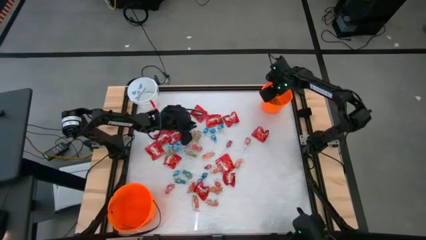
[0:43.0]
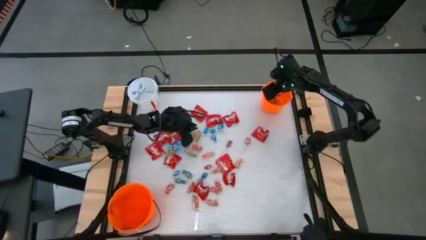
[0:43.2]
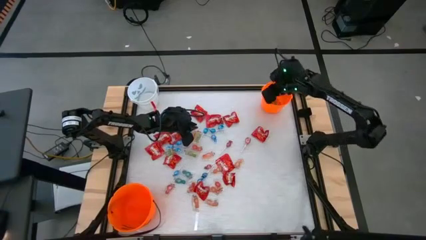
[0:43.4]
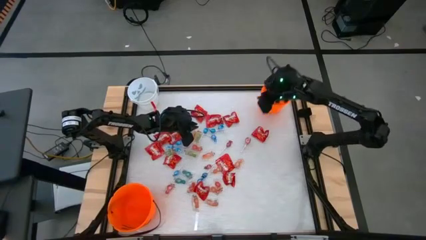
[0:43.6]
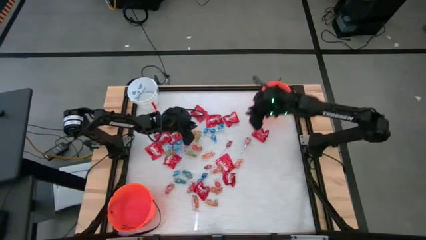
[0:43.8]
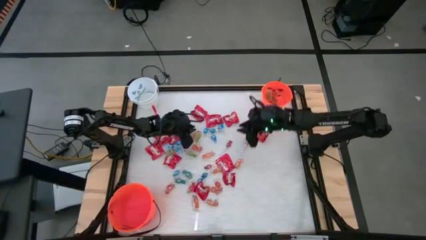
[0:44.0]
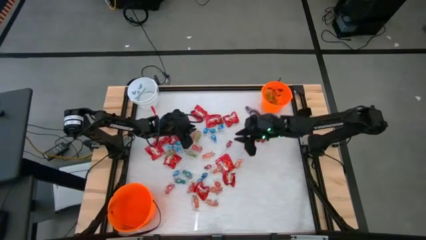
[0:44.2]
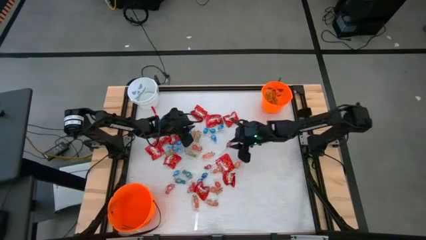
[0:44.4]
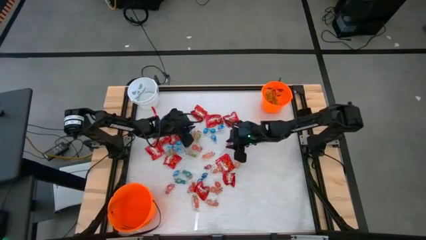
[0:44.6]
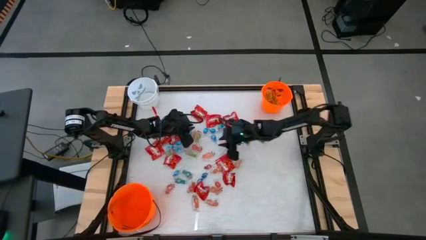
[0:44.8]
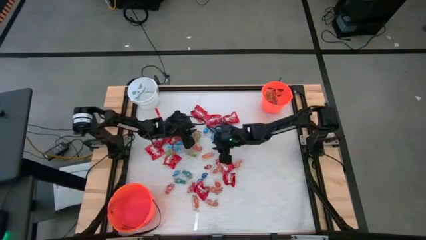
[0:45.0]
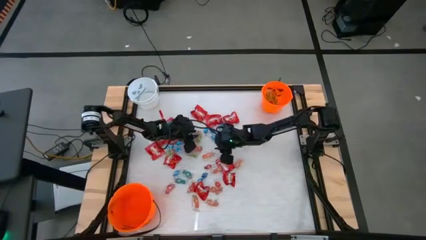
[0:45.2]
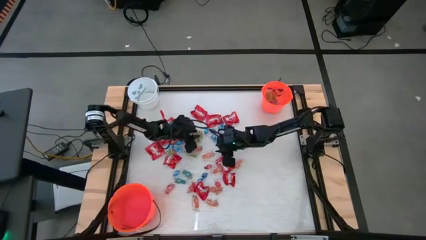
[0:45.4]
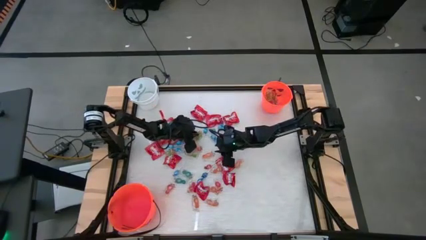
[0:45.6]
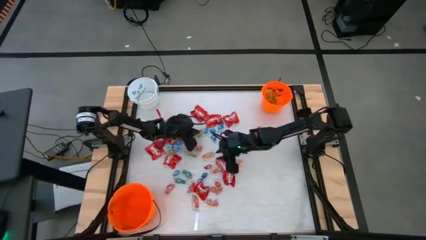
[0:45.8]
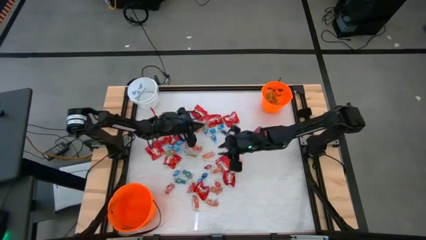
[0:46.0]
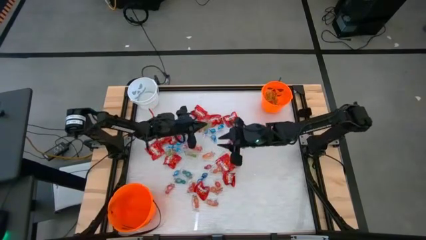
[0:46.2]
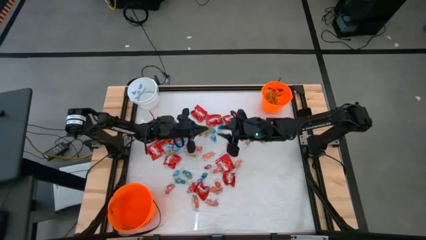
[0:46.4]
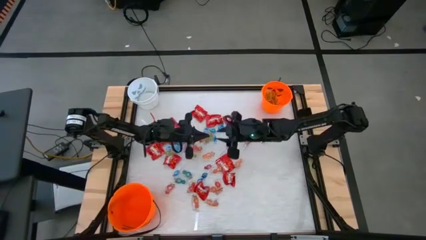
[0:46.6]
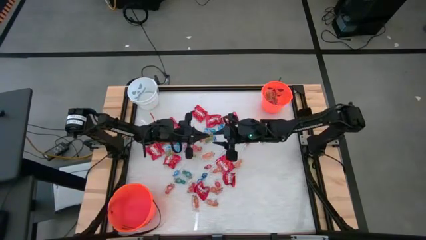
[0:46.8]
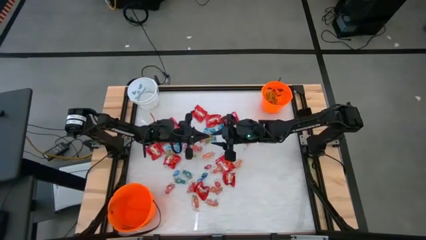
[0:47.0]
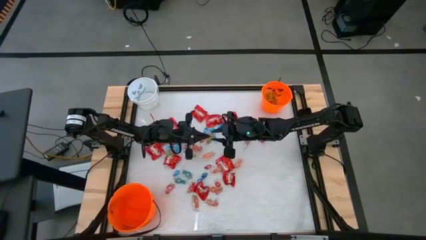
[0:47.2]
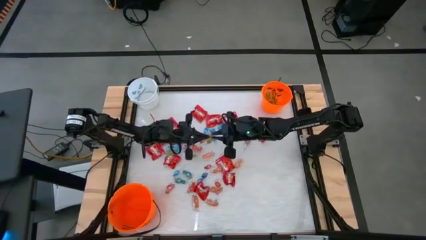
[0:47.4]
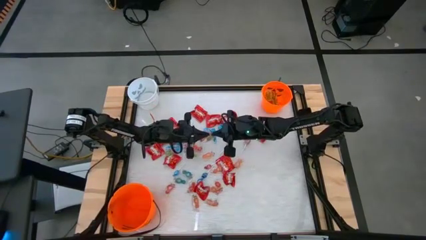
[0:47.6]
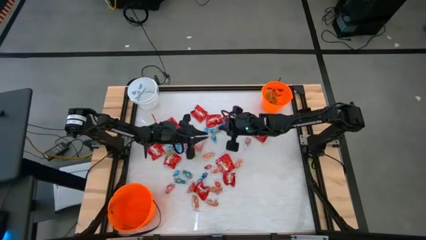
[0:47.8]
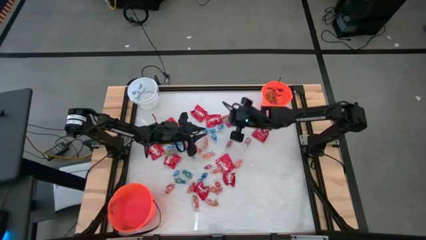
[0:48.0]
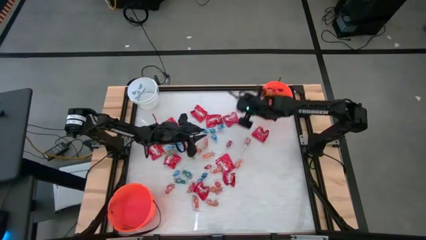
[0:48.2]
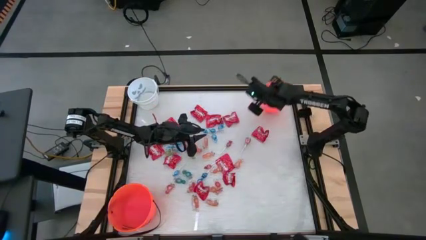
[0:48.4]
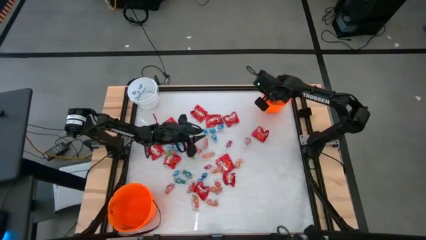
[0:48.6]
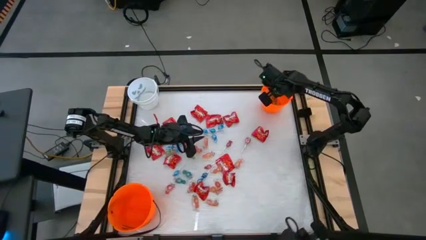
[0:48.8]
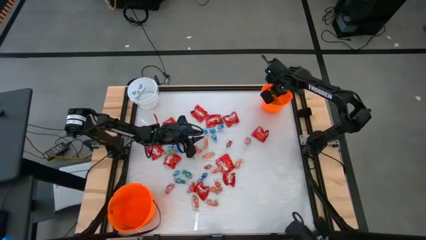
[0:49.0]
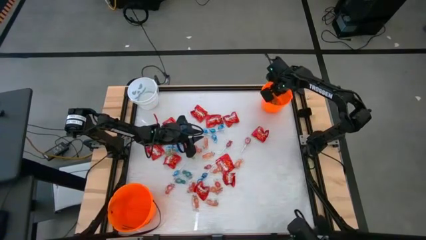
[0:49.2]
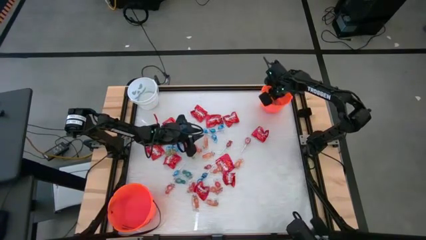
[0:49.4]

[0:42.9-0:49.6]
Task: Sort candy by brand, put in halloween buckets
Put the top green gummy into the top orange bucket

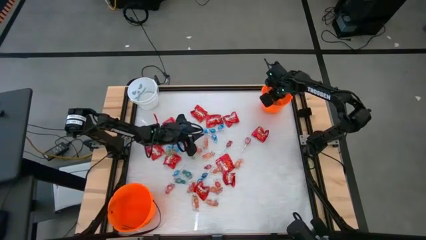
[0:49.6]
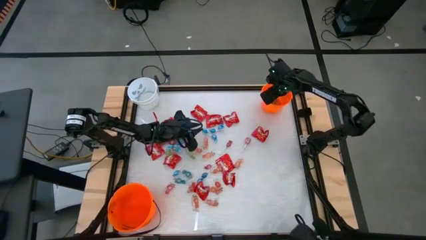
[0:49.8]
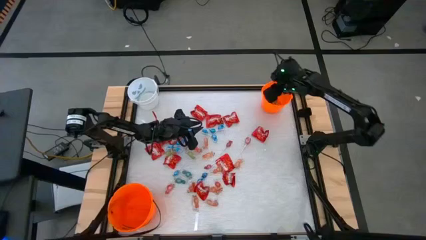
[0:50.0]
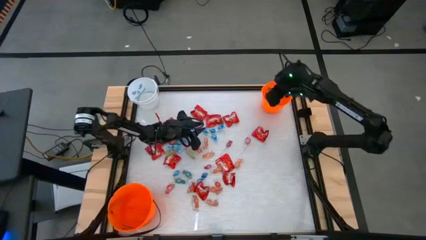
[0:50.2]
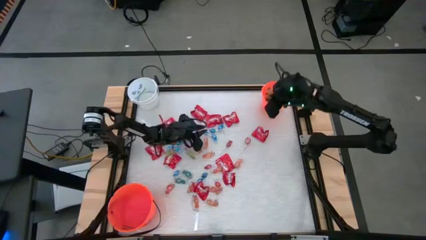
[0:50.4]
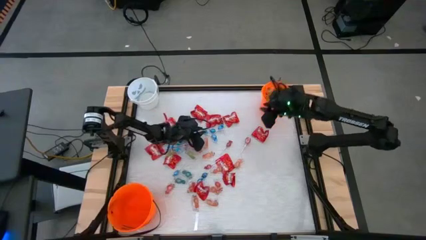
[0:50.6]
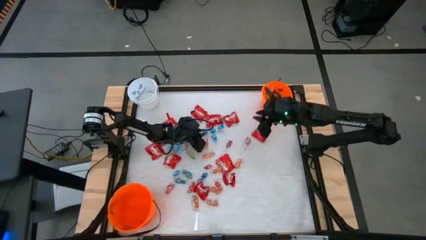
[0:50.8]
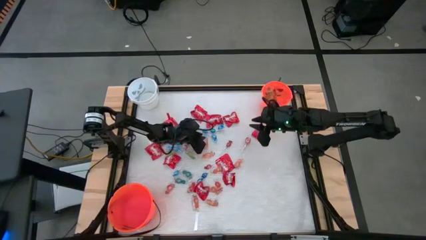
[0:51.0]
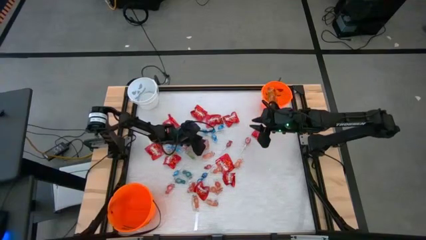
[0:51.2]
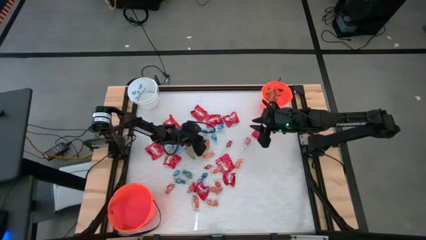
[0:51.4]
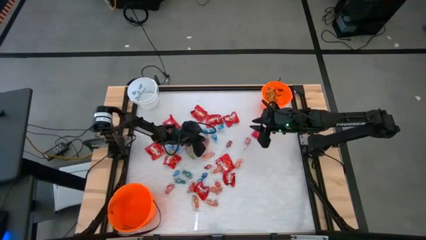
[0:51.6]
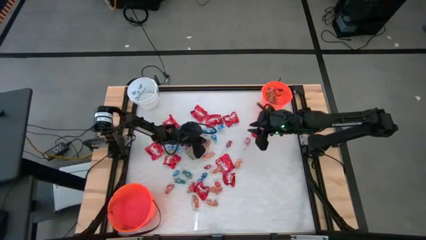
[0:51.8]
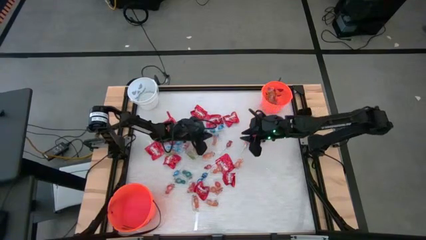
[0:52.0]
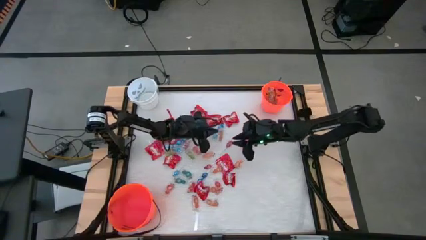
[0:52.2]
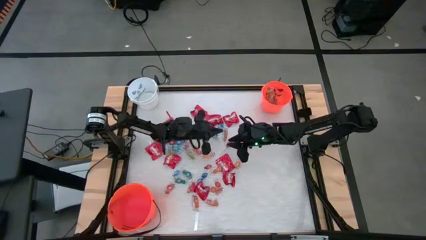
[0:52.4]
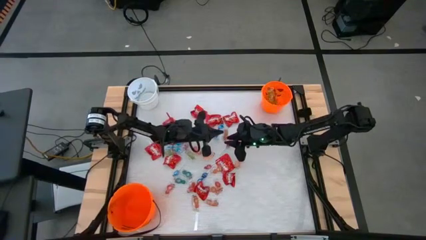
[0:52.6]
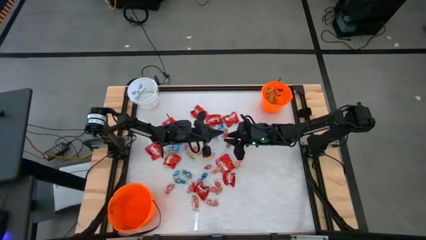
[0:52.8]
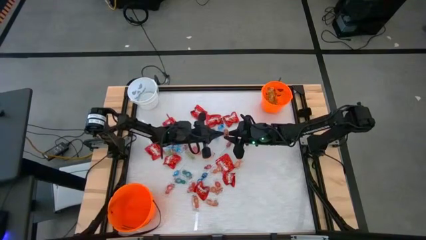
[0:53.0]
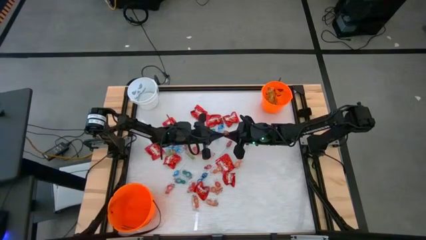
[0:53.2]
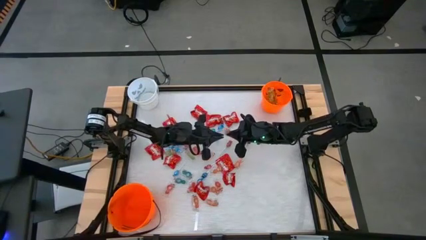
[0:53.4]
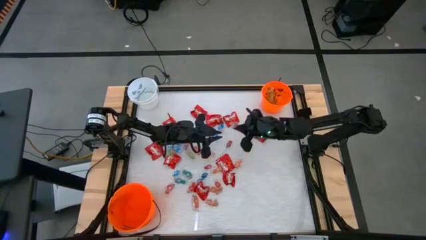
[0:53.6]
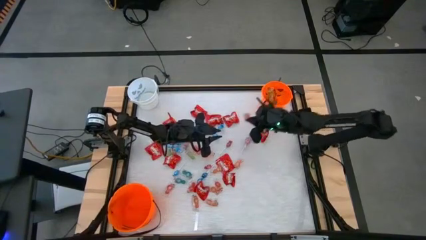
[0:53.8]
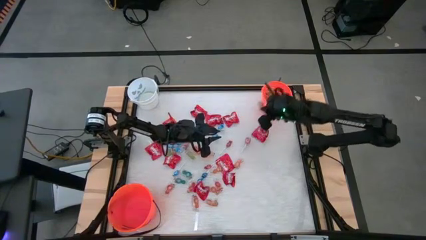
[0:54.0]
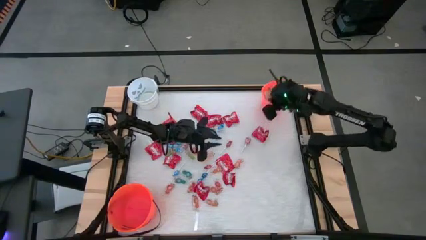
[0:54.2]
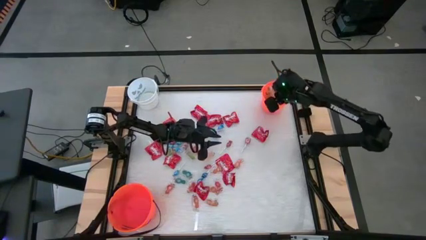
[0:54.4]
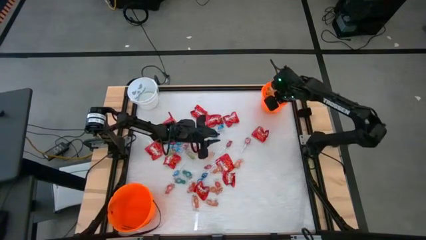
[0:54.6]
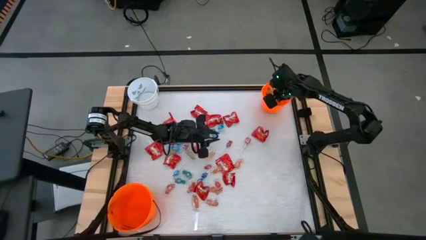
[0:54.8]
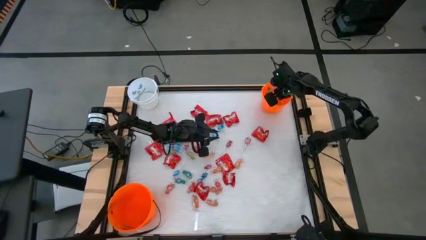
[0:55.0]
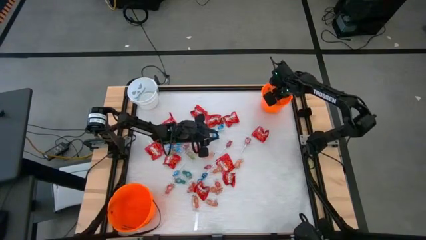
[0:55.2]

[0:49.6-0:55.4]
Put the orange gummy into the top orange bucket

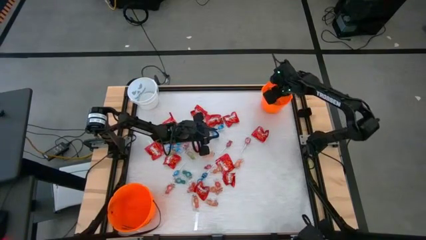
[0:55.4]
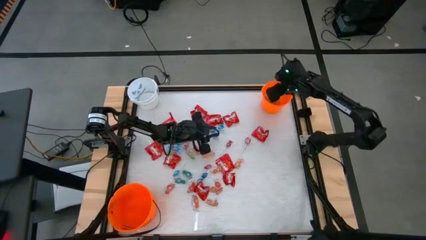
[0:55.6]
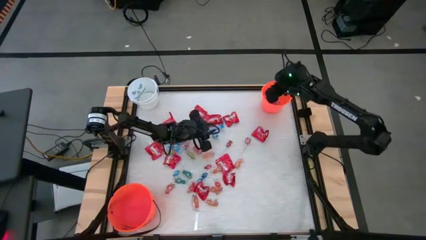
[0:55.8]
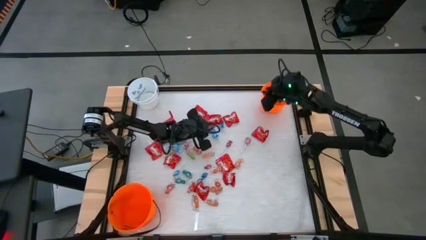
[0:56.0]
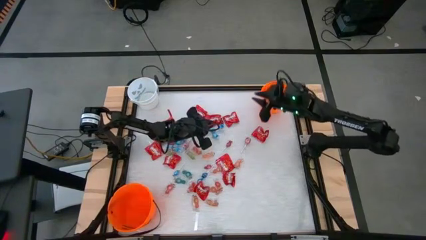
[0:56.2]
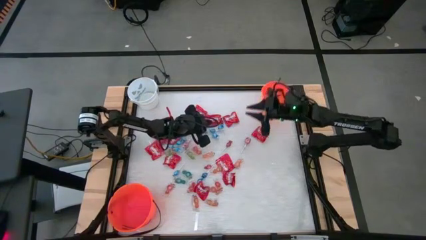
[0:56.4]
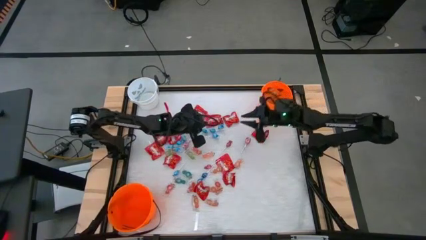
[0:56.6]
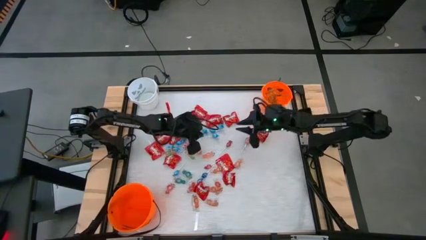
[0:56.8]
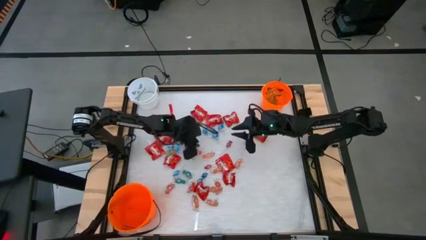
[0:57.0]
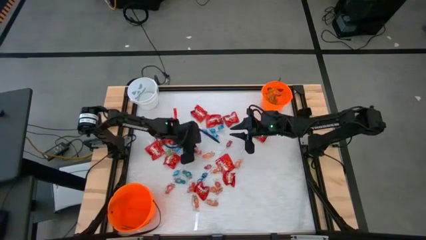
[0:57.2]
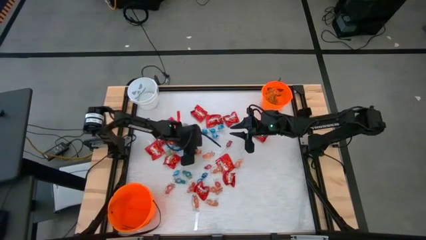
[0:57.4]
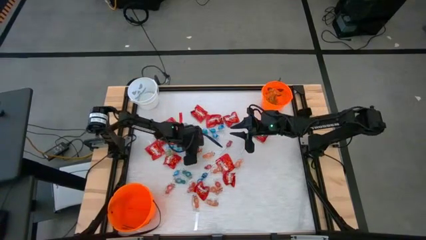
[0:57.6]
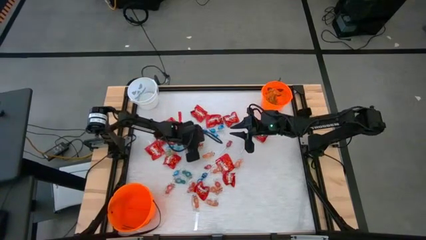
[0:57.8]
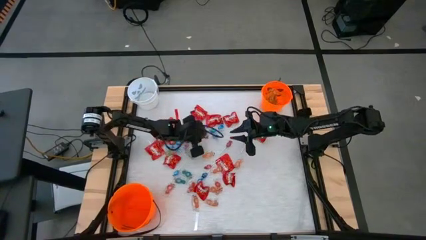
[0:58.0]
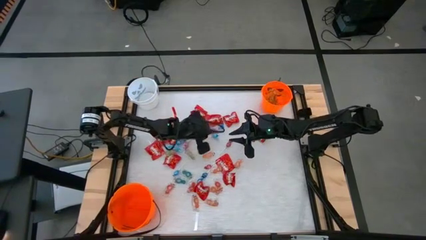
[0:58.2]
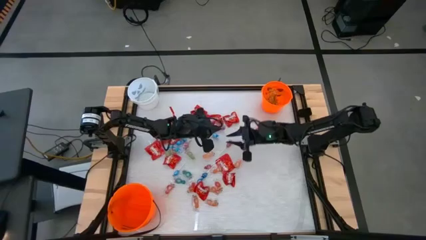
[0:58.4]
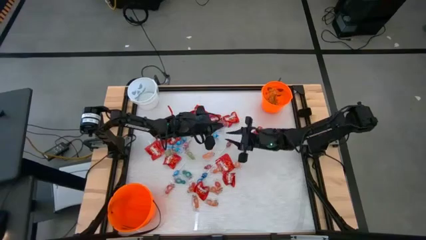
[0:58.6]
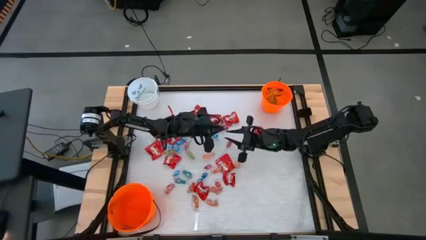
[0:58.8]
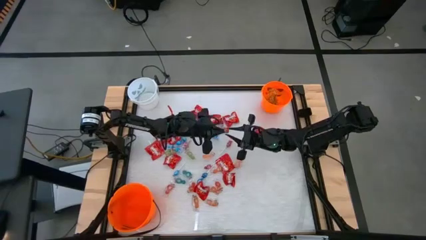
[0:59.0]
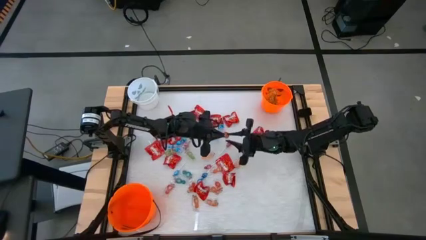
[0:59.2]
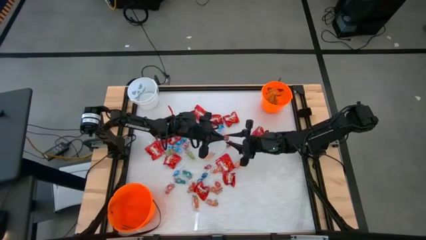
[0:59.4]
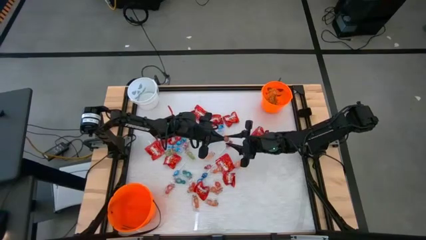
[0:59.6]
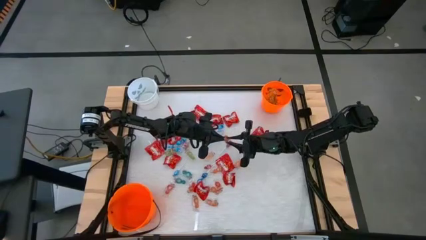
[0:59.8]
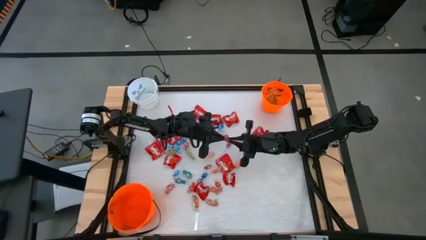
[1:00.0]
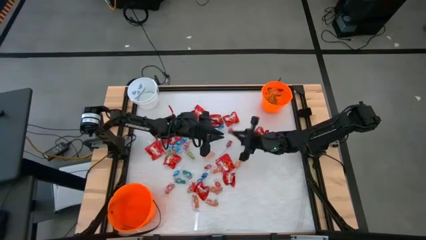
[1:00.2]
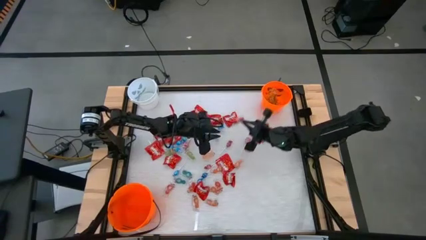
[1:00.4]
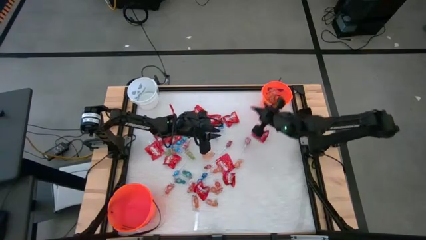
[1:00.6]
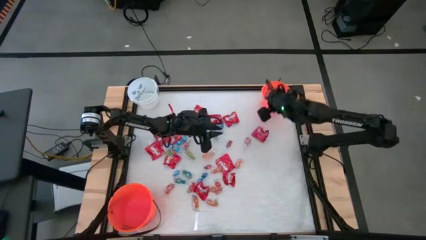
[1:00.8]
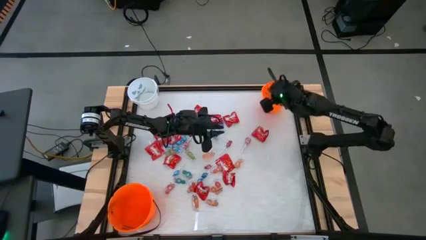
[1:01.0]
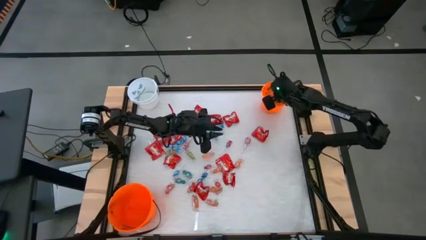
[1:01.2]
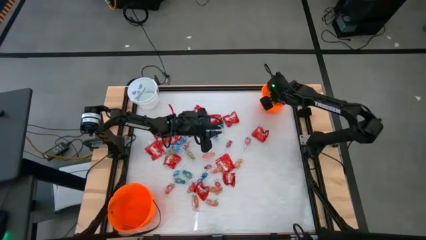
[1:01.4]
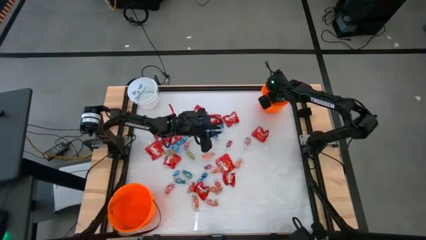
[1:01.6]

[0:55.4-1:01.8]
Put the red gummy into the top orange bucket
